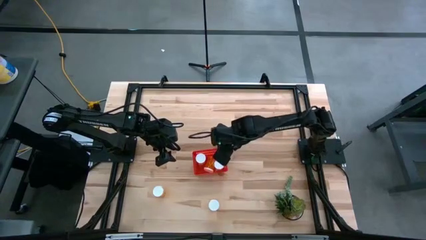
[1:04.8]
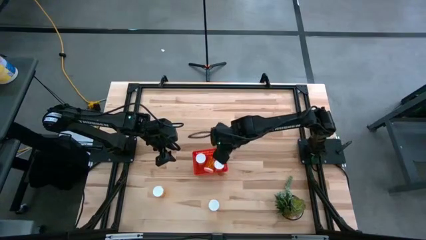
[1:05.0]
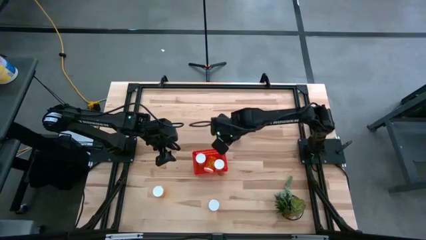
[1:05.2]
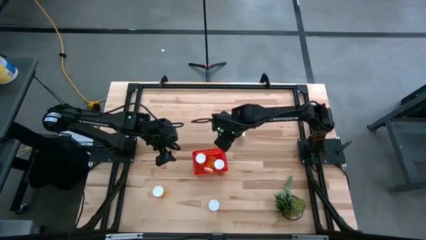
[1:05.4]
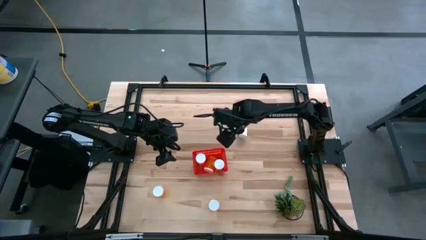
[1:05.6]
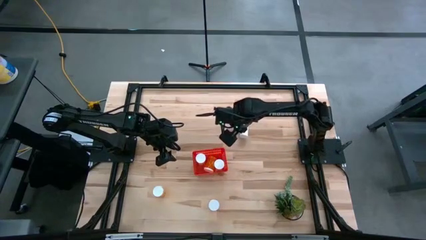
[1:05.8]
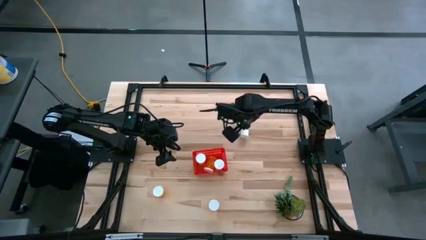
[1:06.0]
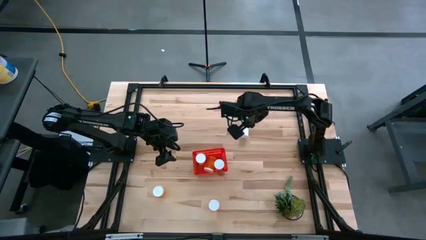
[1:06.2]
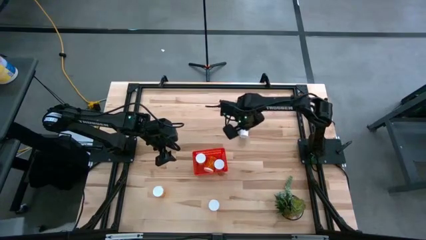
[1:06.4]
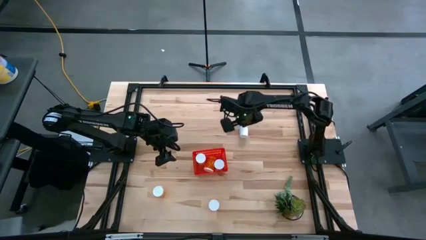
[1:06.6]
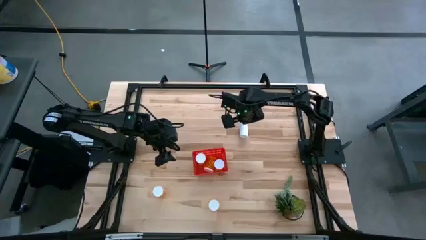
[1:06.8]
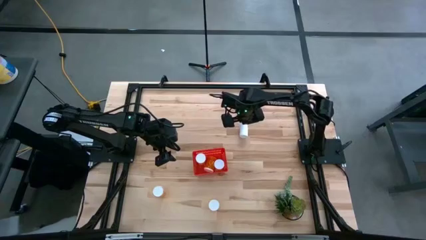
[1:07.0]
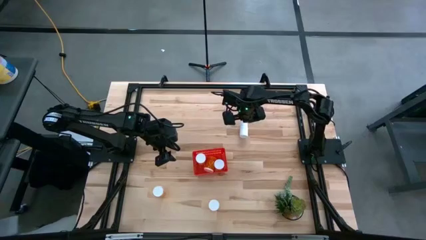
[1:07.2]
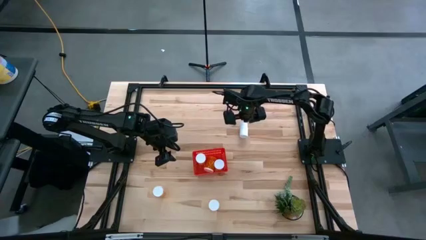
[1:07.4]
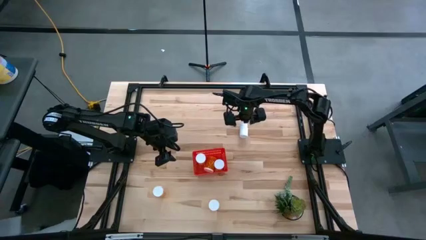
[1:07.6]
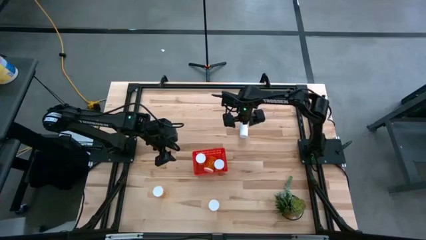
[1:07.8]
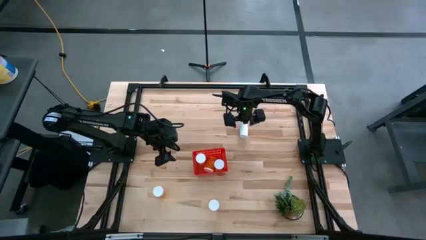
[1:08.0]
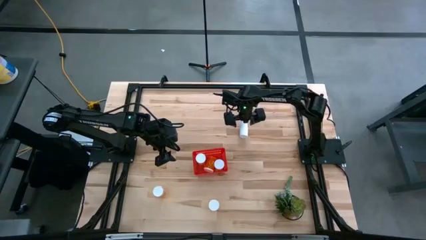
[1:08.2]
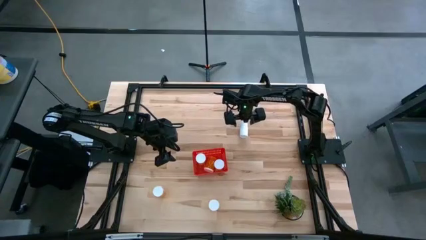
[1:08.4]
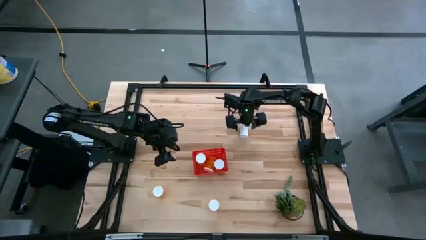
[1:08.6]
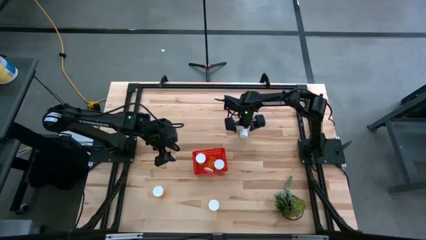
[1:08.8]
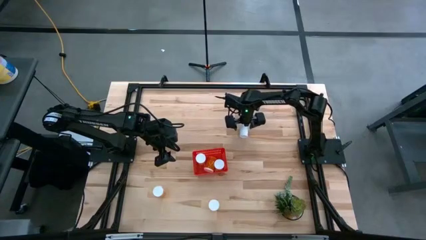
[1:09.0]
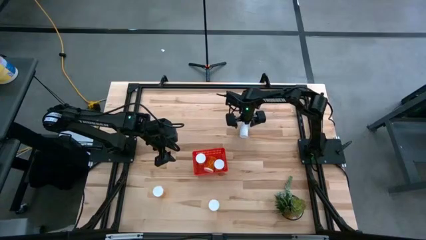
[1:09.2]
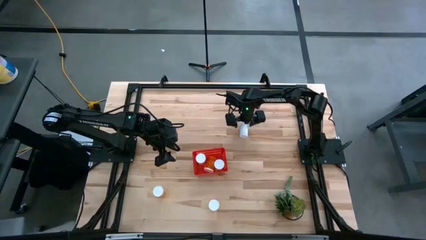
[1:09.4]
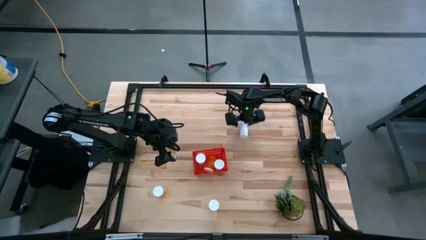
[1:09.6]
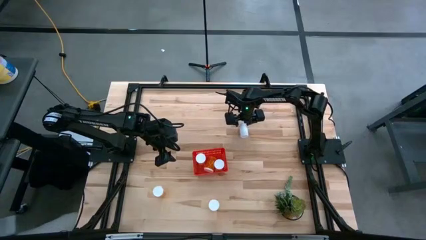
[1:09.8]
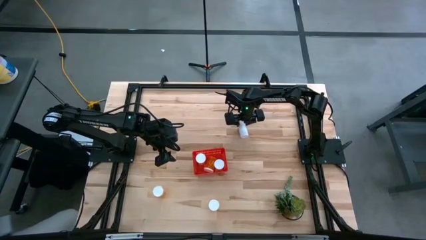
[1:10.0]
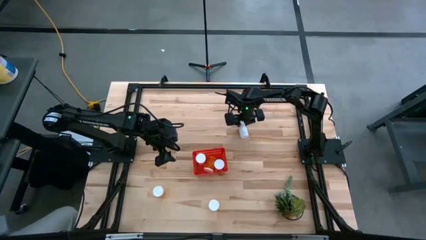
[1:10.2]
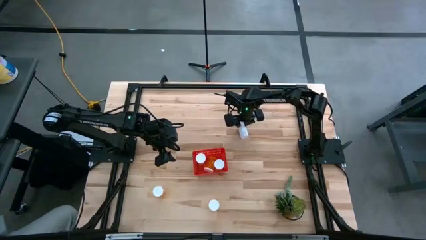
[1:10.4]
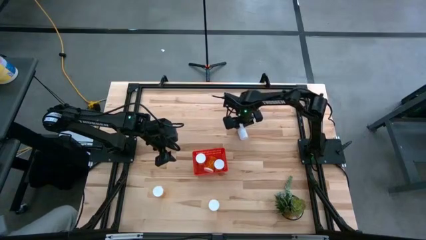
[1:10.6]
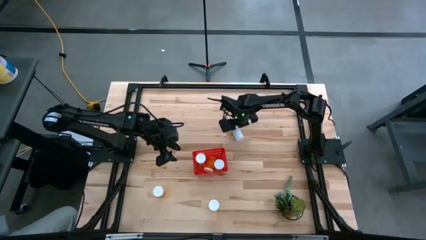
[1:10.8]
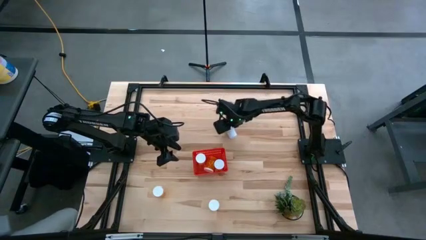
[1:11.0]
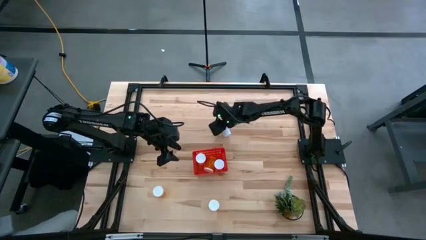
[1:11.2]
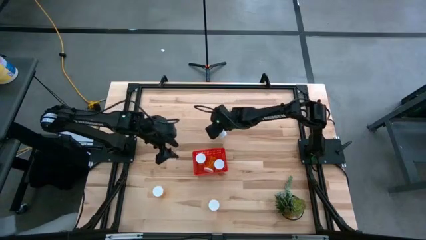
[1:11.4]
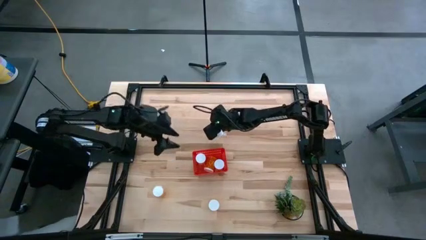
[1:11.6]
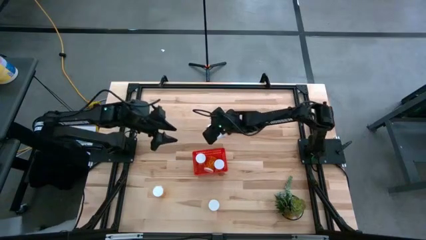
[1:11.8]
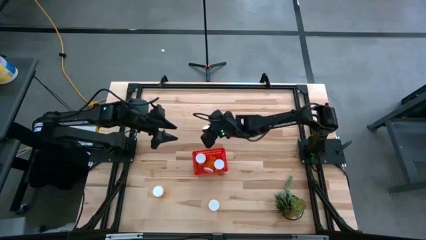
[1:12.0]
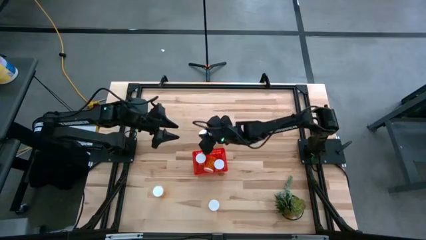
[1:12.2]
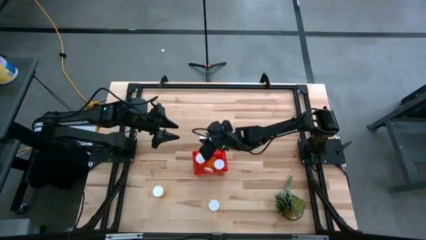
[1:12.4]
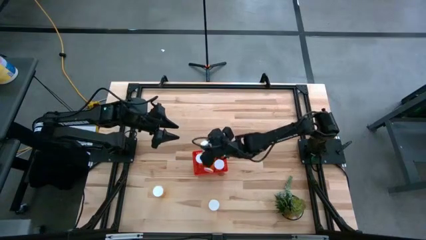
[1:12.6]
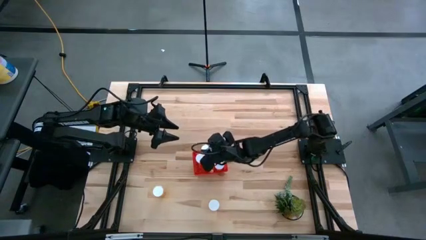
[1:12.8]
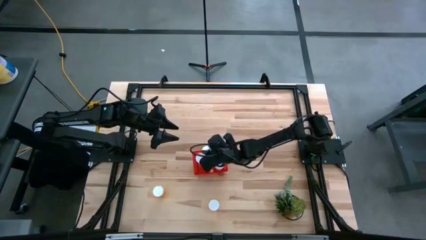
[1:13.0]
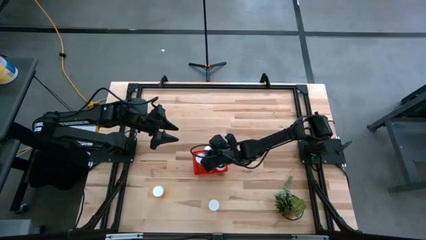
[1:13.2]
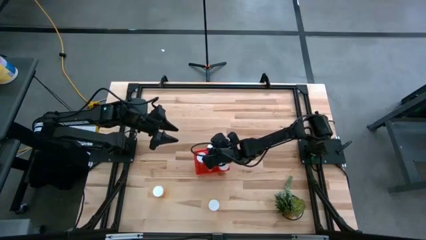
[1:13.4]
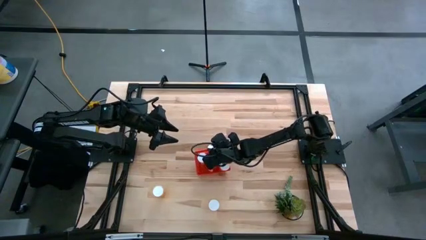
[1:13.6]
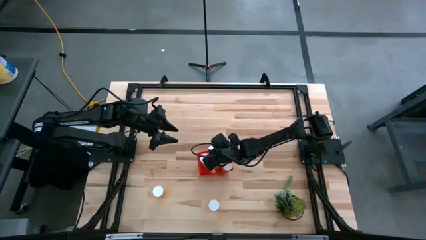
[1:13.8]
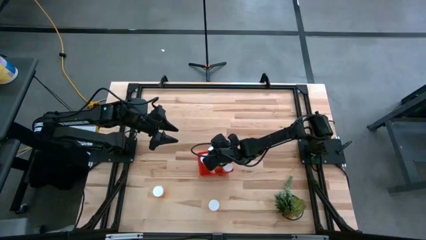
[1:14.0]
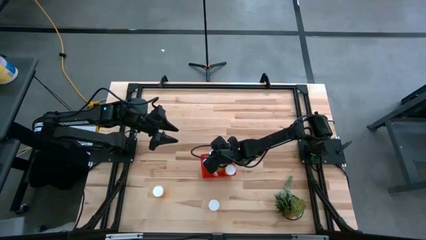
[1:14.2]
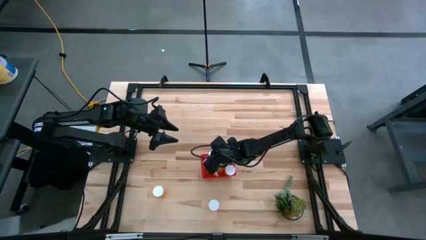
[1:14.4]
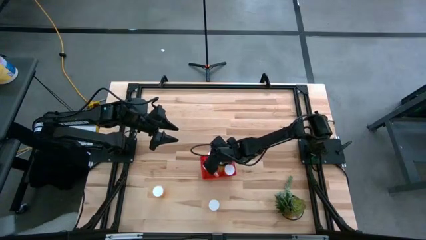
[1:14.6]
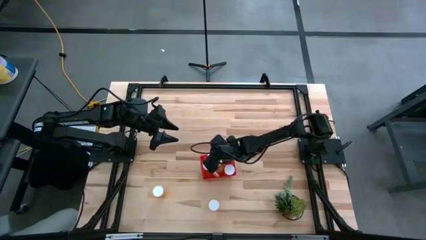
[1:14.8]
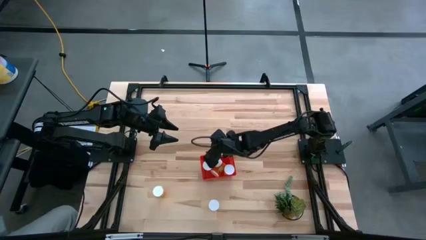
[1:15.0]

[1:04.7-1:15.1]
Task: Pick and place pill bottles into a basket
Put the white pill bottle into the red basket

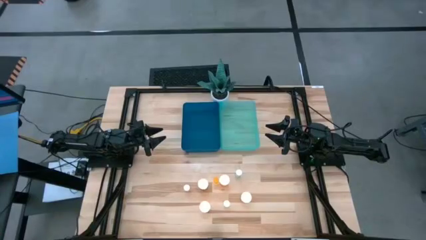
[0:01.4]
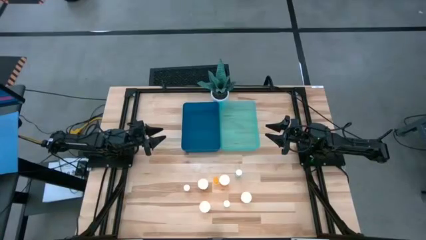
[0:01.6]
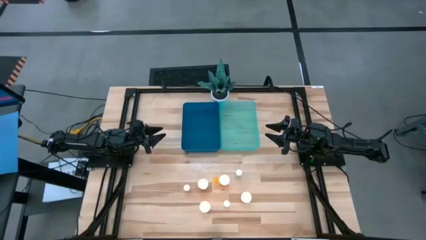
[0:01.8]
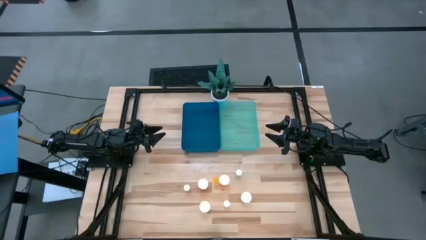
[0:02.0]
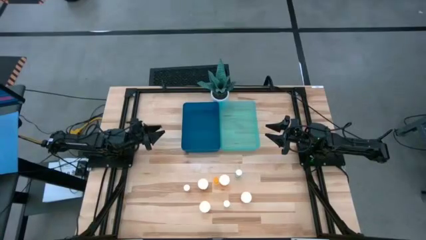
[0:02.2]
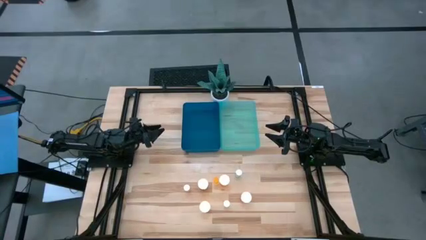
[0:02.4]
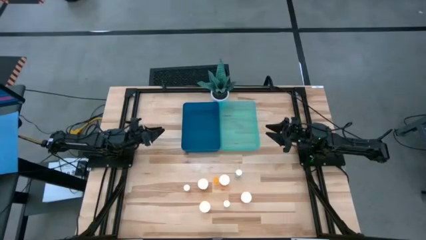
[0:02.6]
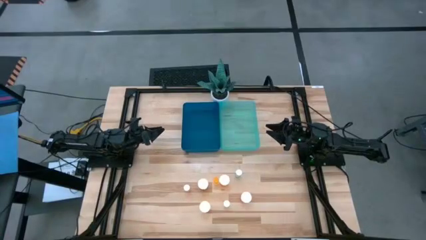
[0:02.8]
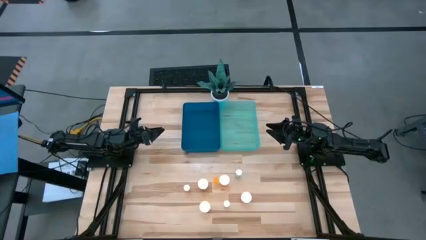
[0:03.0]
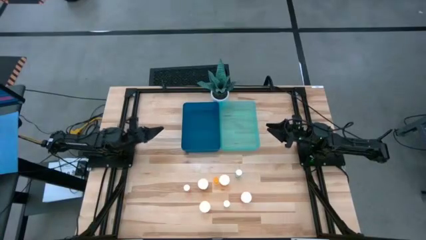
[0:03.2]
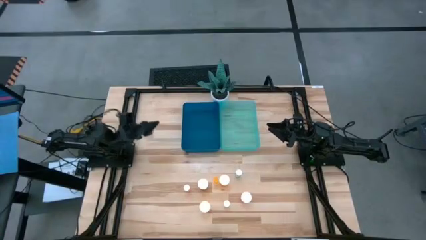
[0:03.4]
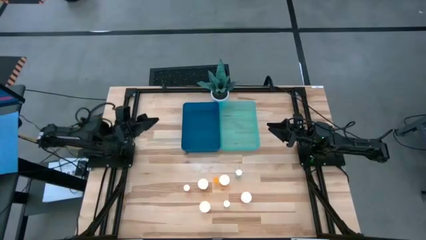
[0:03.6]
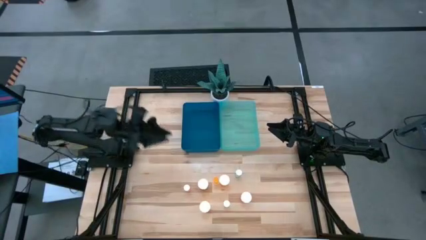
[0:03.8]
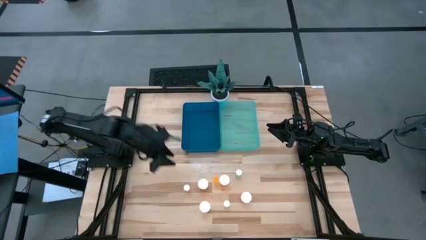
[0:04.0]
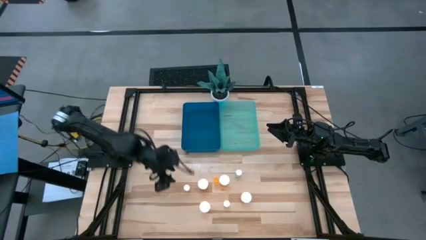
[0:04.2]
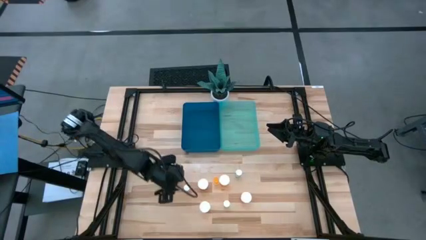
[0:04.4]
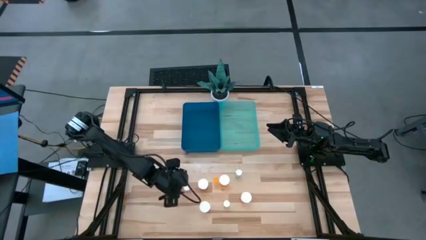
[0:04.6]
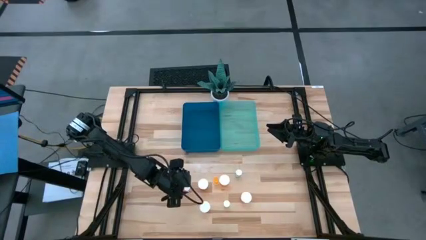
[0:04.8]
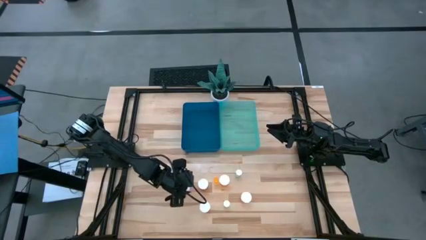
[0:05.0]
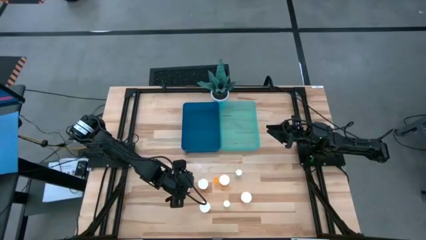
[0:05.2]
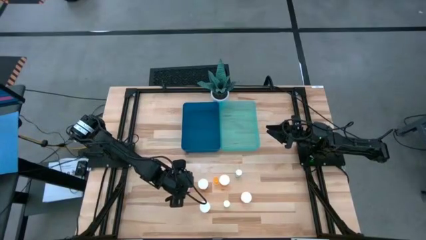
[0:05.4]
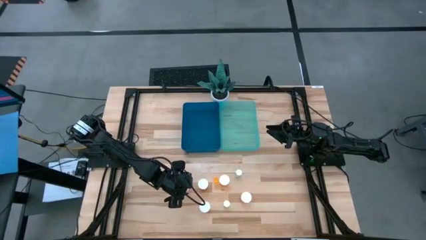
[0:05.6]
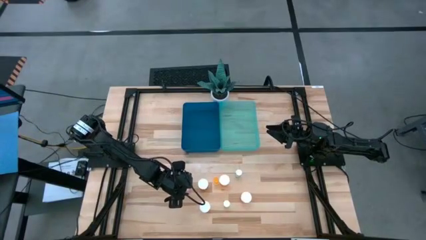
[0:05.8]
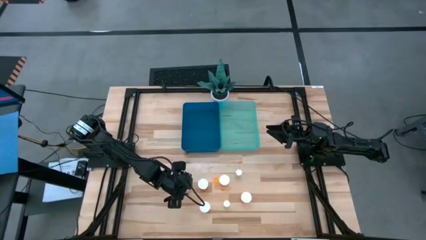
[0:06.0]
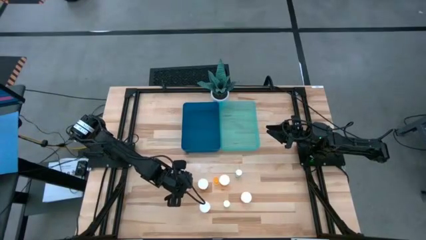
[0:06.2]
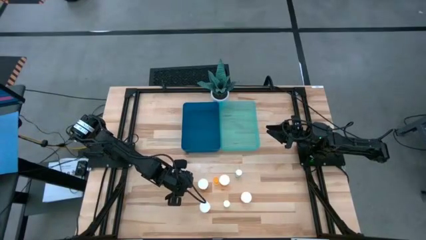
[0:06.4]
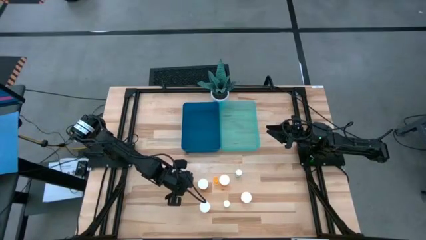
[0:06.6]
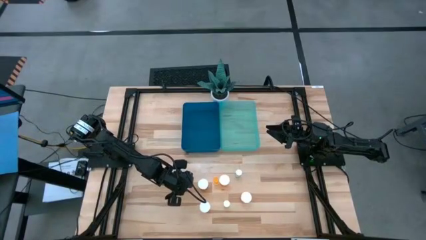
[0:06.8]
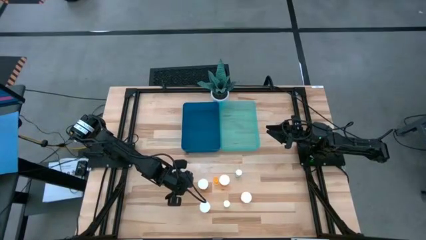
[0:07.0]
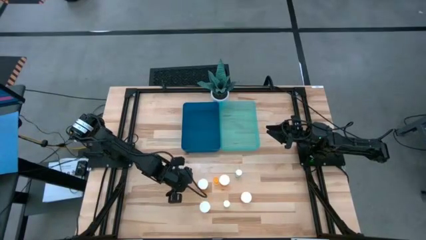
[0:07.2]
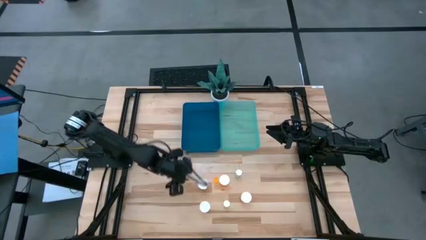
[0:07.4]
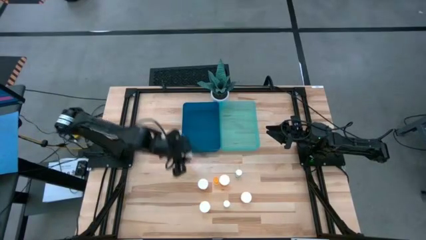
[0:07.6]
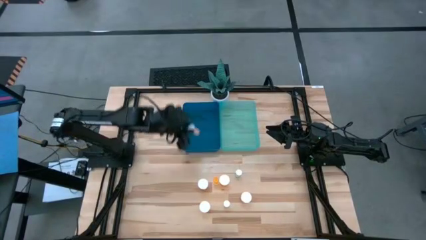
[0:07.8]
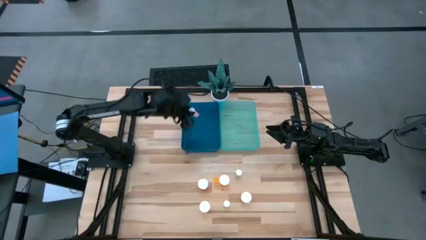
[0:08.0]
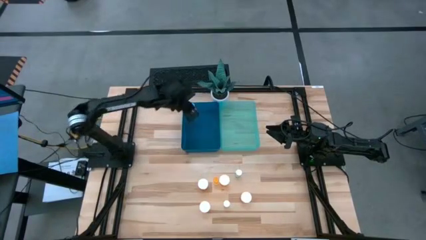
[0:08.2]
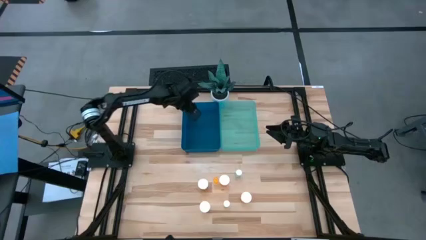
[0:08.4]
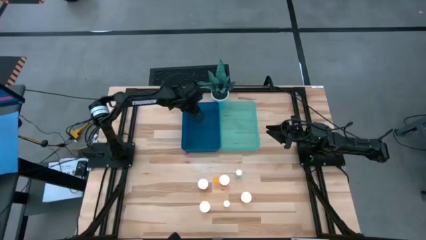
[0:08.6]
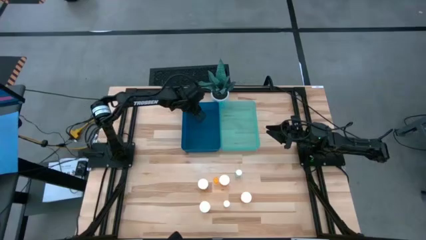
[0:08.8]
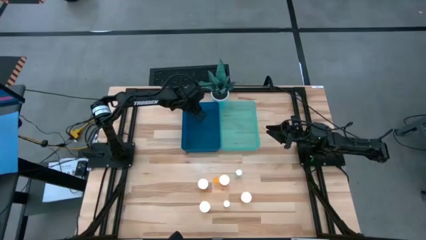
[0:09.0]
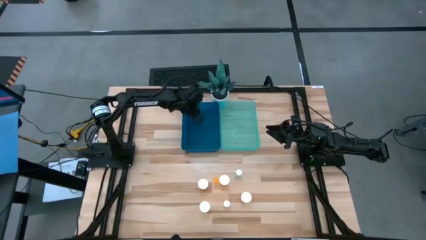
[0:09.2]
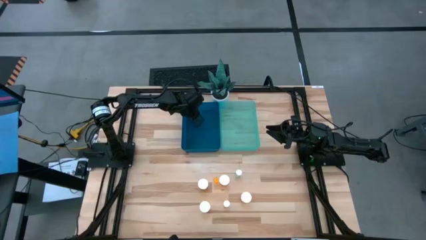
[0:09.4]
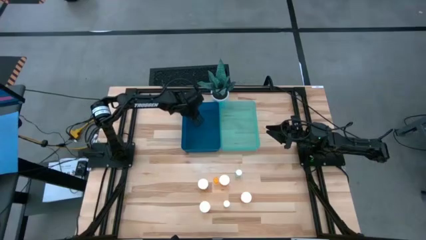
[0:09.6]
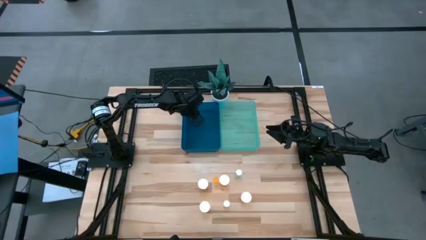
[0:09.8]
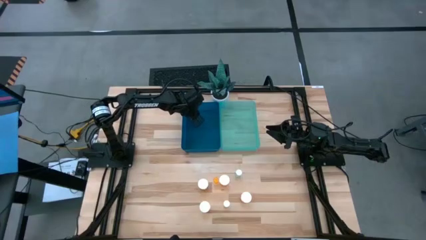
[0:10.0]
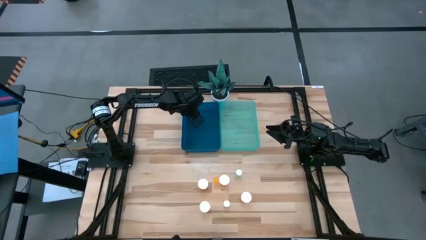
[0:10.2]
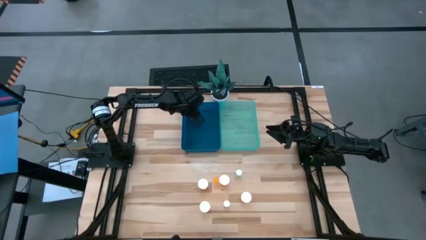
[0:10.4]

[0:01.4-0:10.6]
Task: Pick and place medicine bottles into bin by pill shape (circle, oval)
Put the small pink tablet bottle into the blue bin
